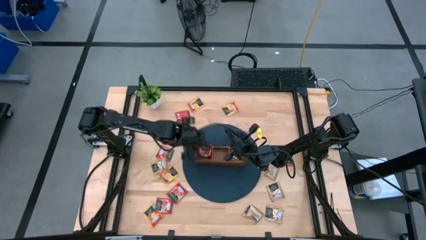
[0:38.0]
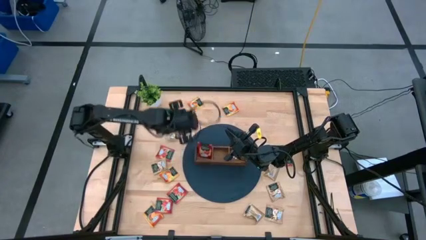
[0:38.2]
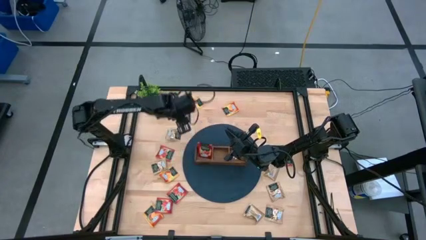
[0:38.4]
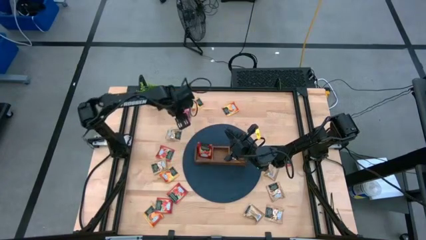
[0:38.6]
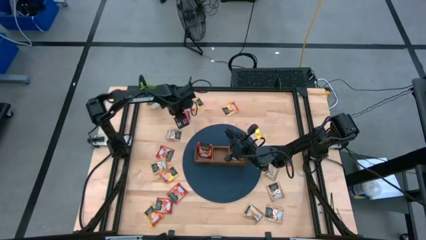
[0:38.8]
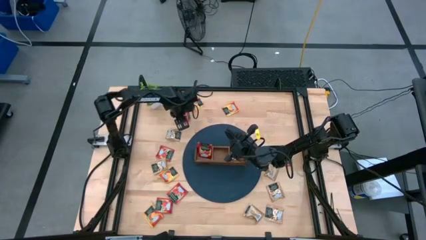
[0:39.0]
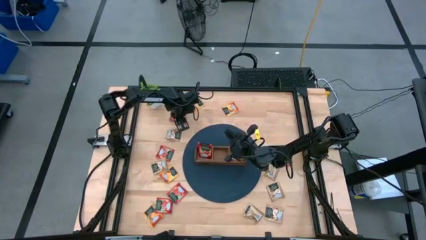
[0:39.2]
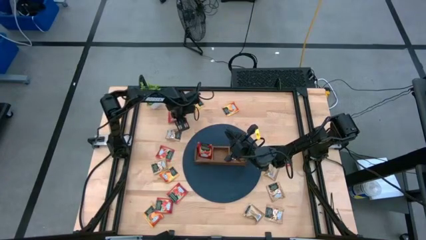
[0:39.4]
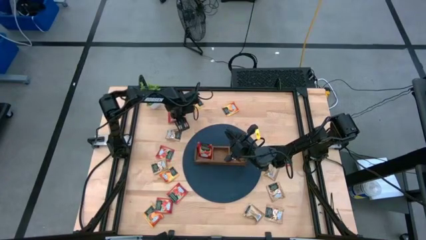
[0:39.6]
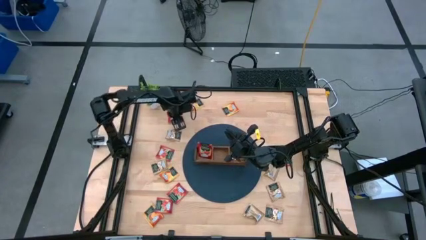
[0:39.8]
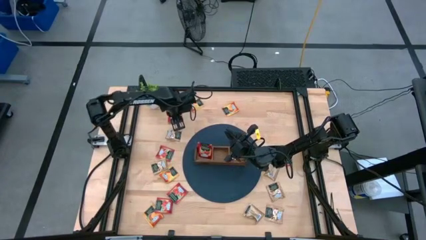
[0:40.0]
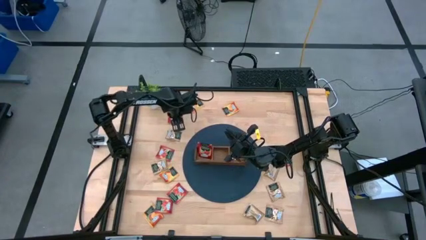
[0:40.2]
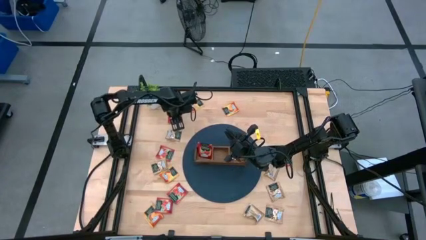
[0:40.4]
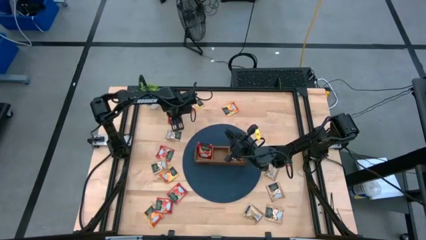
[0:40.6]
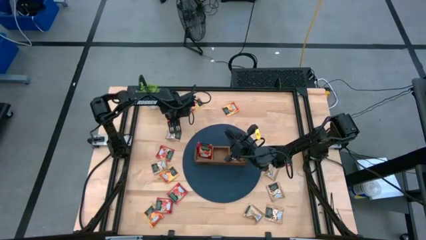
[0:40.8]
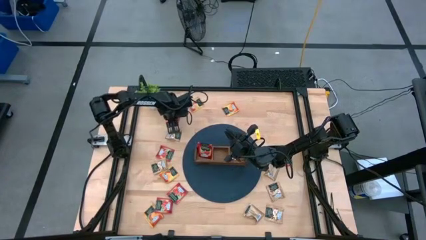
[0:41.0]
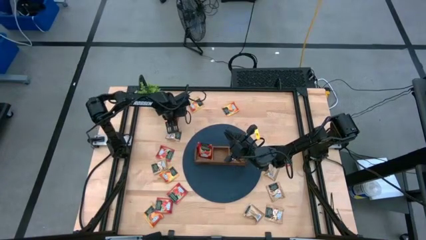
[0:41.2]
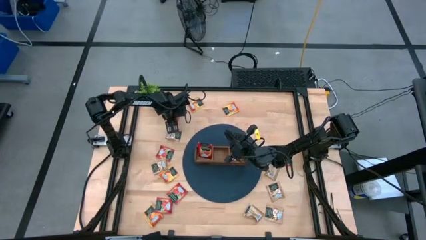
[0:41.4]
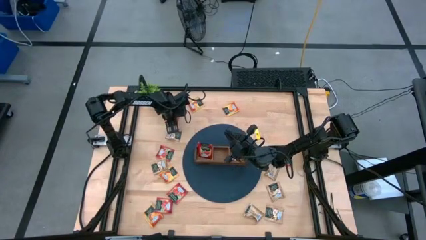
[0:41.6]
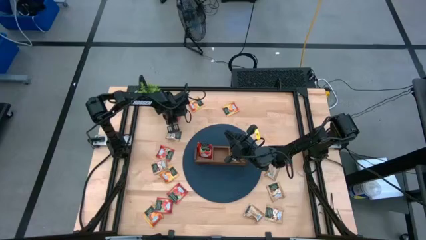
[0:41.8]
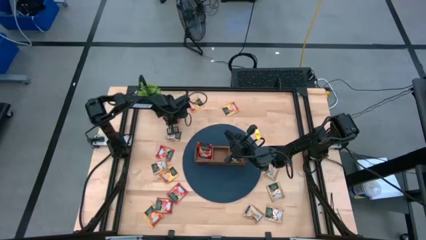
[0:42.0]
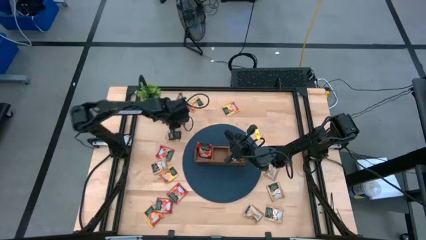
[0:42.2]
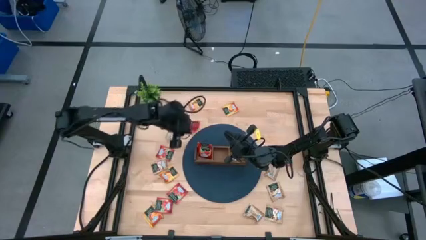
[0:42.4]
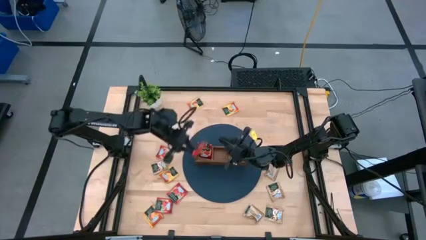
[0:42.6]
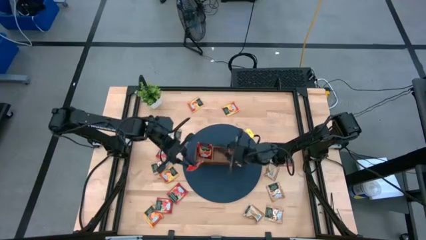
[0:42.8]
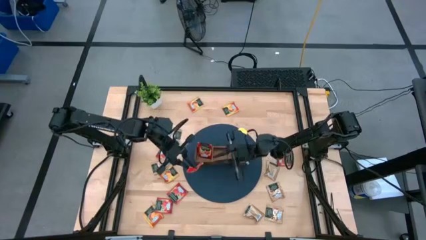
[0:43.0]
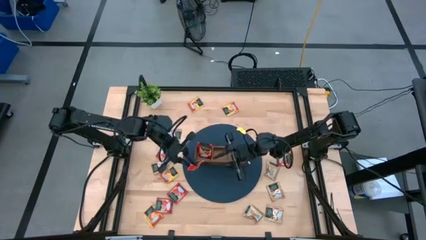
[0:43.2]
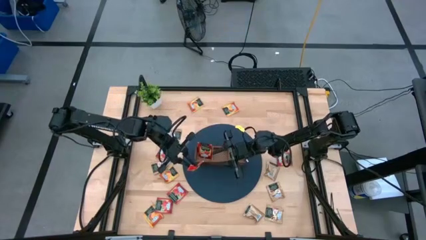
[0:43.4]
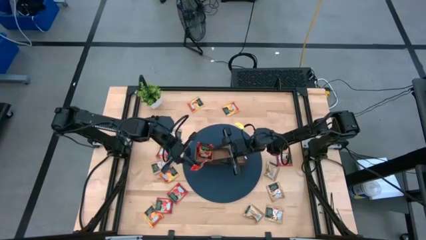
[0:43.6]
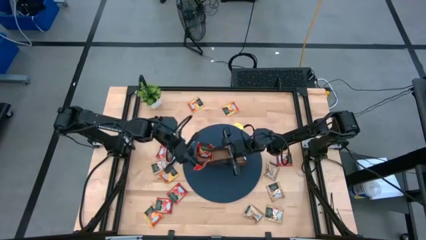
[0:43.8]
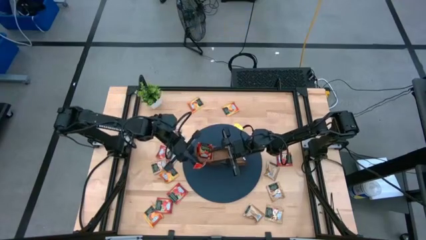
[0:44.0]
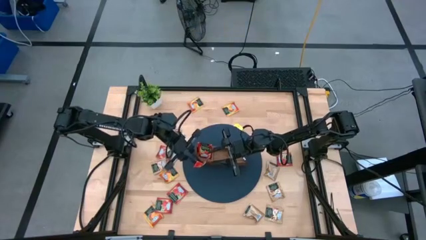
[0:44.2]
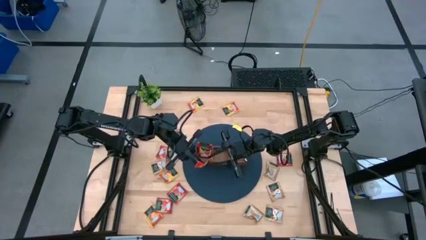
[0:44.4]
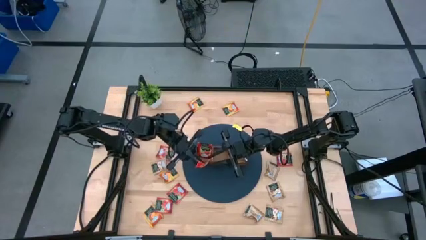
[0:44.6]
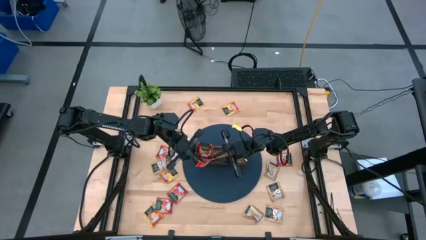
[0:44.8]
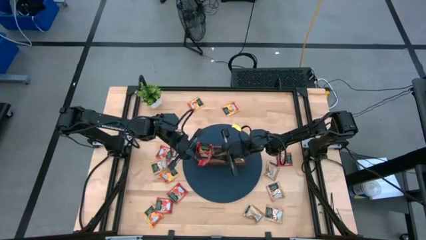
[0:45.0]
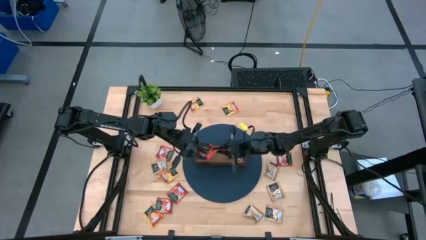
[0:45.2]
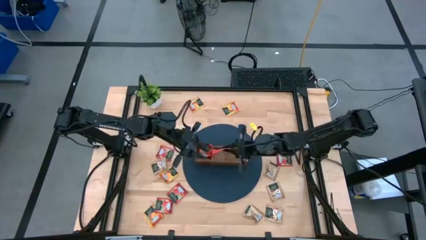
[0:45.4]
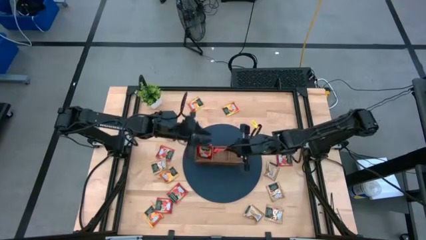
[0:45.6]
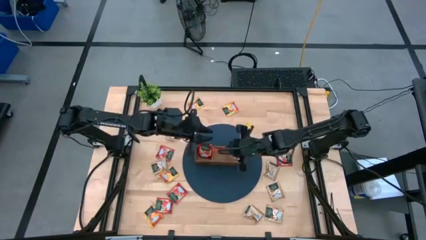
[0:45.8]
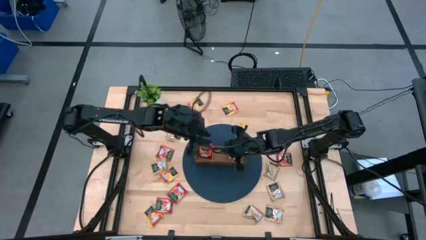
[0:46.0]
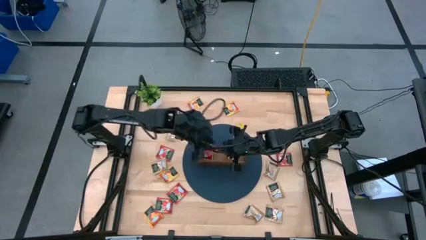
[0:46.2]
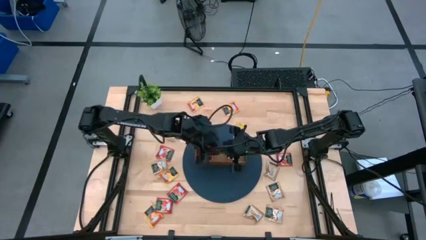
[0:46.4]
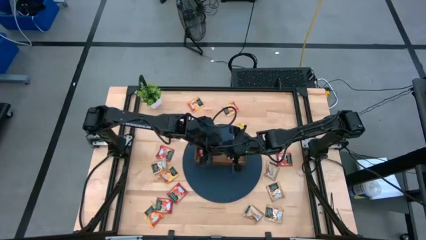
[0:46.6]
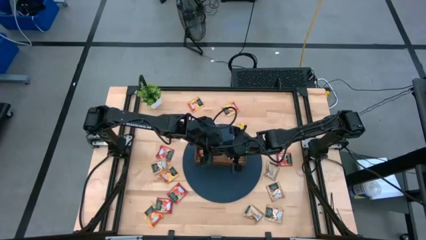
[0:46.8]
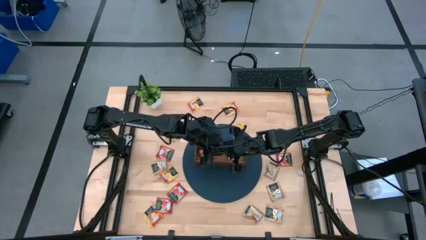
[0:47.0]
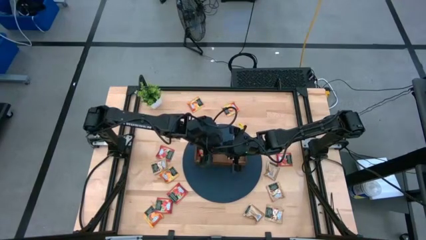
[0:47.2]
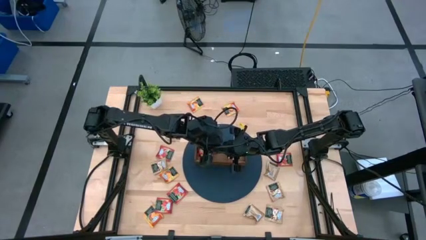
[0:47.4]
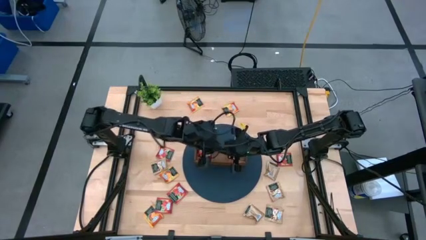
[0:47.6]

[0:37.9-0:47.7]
Task: Pick & Place Tea
Put the red tea bag into the left section of the wooden organizer

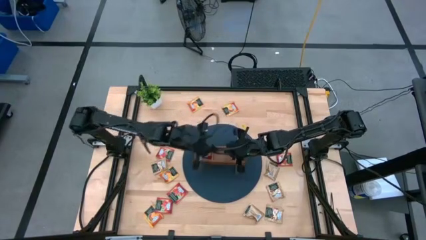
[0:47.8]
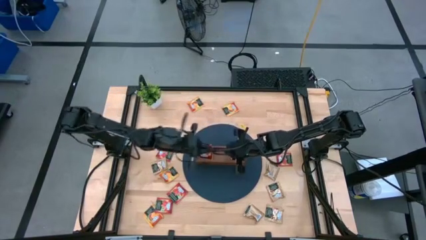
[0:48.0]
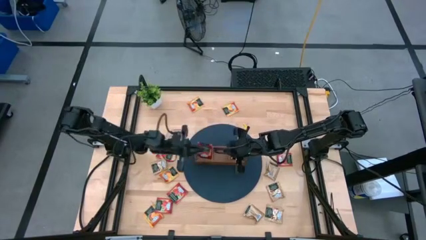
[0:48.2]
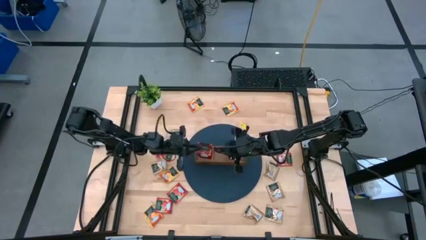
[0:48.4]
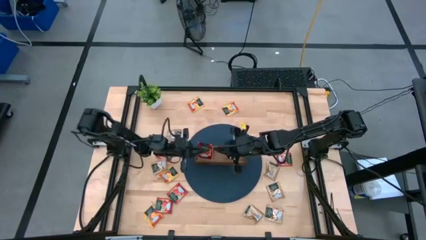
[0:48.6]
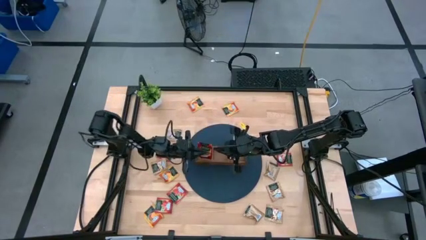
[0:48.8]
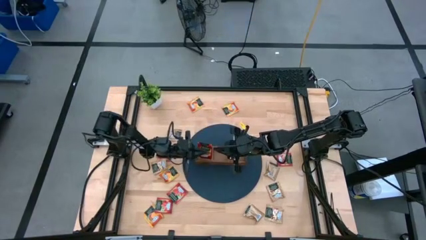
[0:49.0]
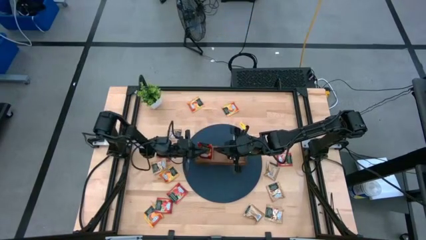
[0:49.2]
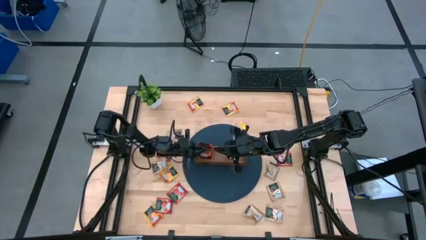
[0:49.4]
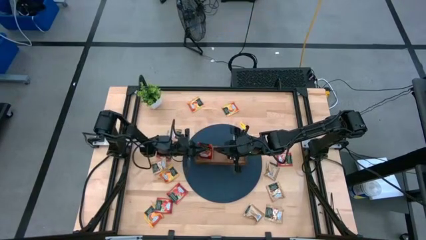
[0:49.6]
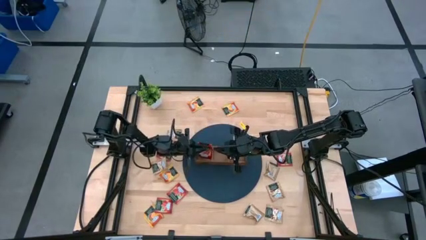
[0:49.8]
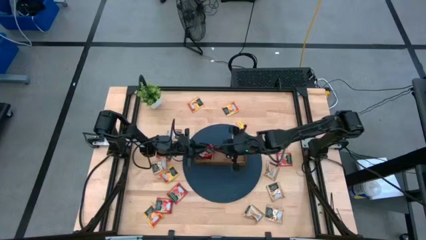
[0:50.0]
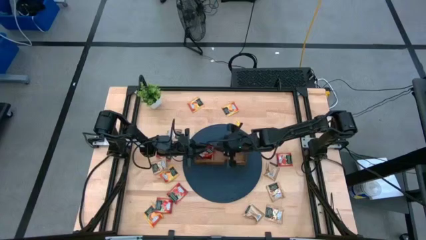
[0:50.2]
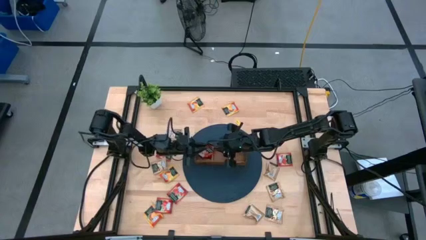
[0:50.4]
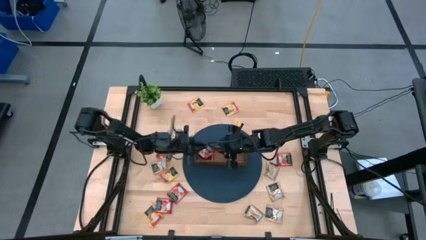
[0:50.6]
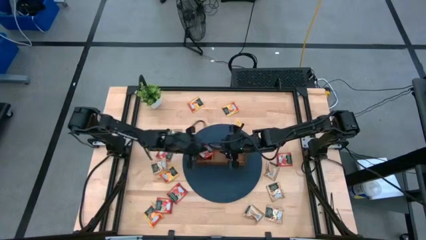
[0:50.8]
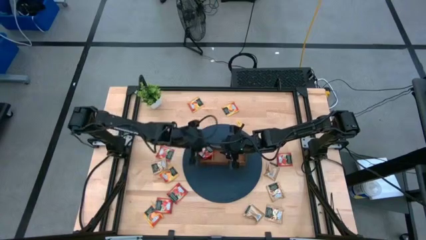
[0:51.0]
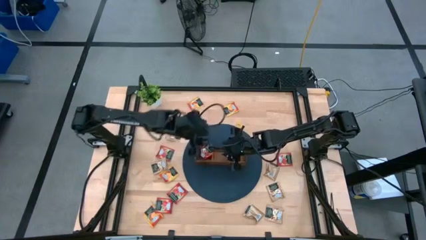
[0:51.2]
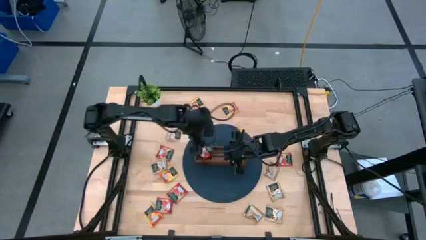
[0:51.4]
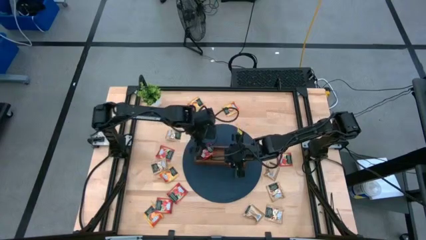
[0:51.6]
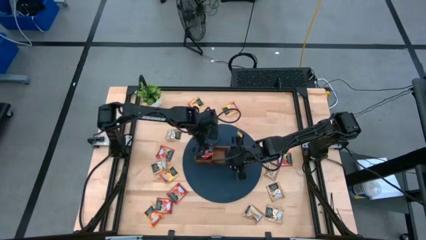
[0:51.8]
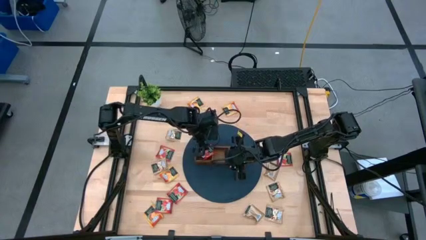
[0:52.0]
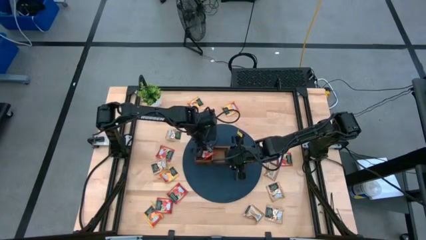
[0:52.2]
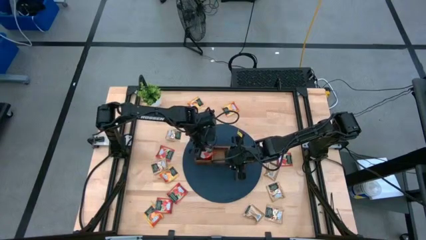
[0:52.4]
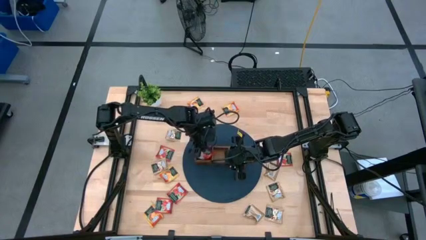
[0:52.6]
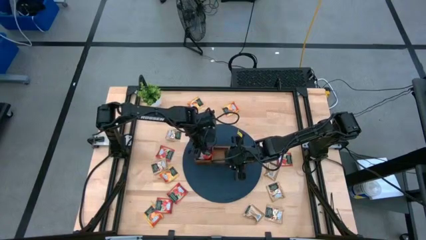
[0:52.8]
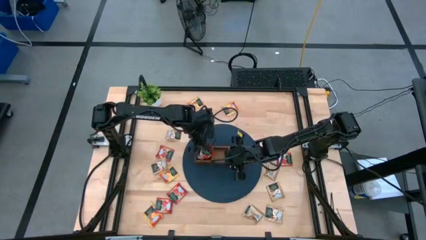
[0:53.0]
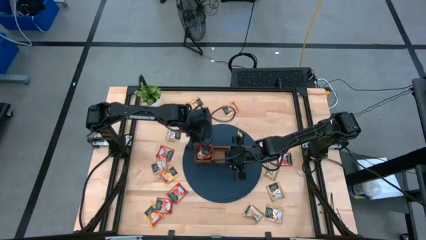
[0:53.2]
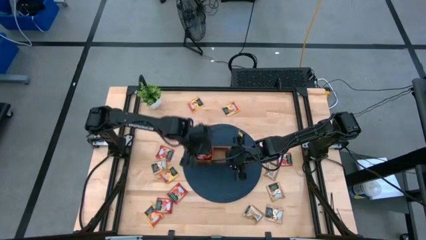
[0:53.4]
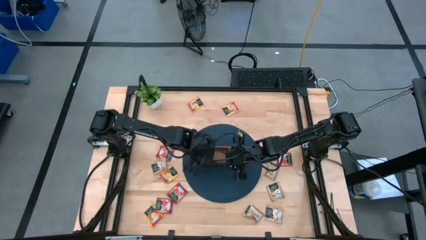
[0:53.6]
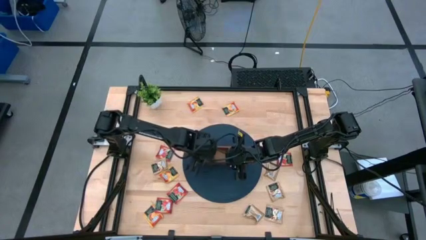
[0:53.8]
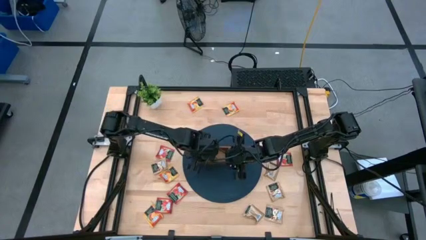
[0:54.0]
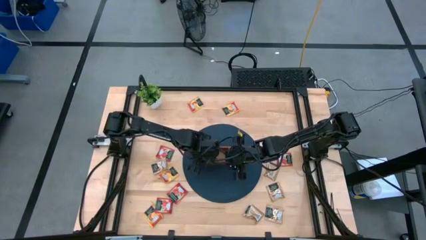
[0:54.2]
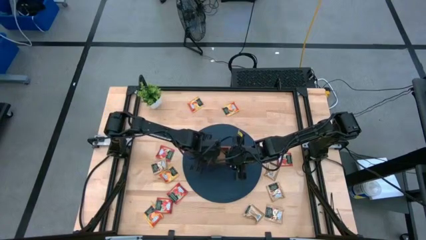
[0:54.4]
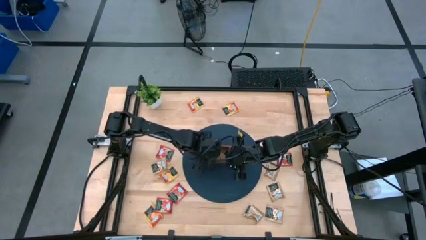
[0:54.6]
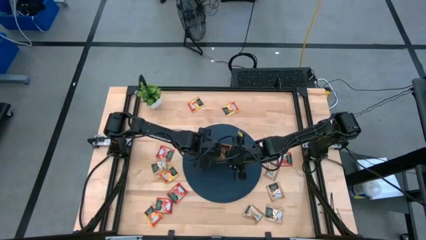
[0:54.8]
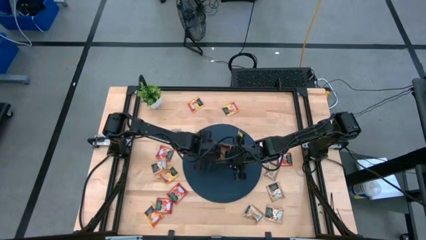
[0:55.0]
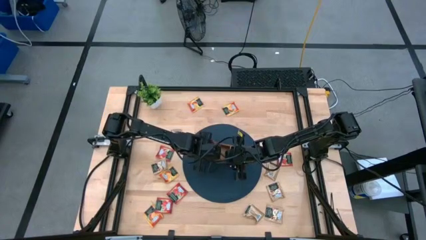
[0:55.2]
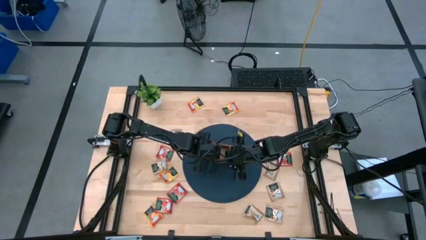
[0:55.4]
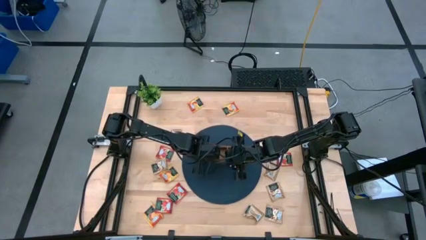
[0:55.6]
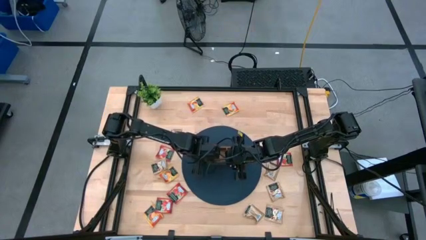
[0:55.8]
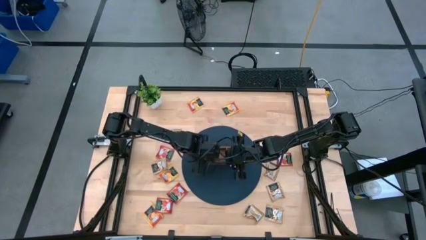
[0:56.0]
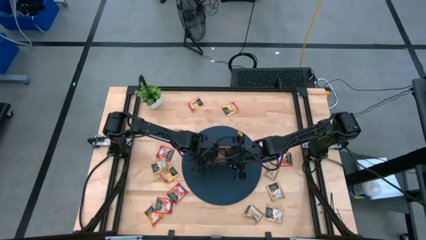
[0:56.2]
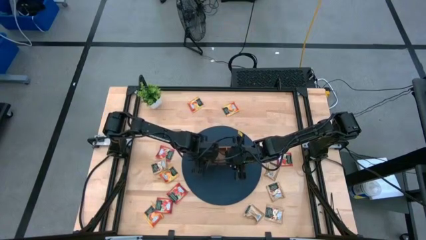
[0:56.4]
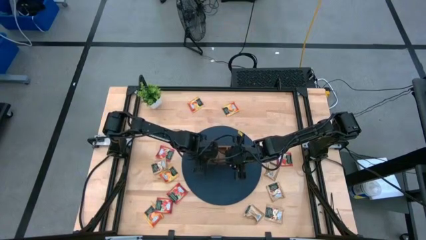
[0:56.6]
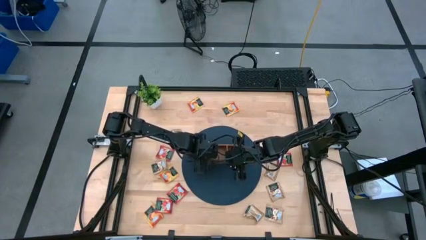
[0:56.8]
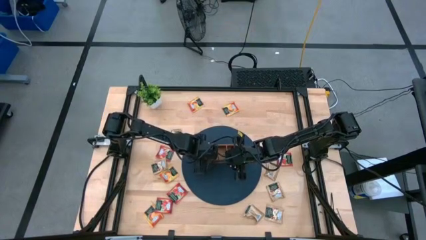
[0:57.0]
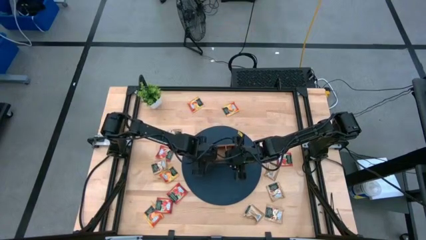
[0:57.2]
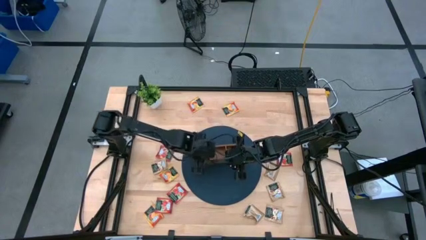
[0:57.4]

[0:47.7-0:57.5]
Put the red tea bag into the left section of the wooden organizer
